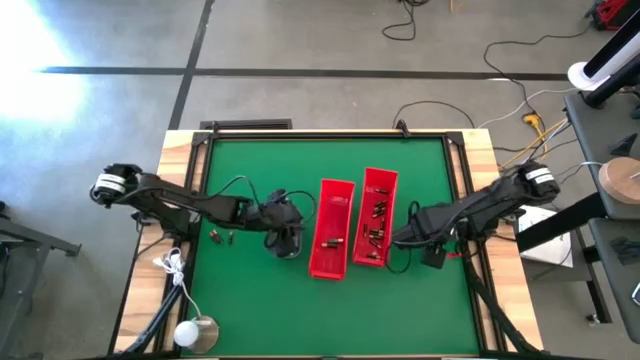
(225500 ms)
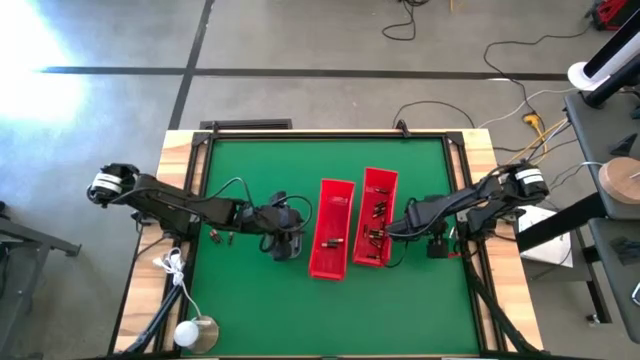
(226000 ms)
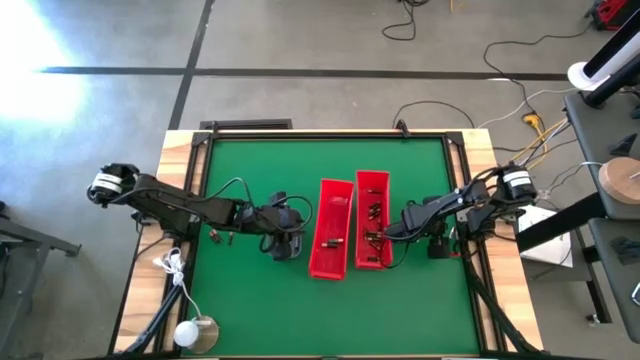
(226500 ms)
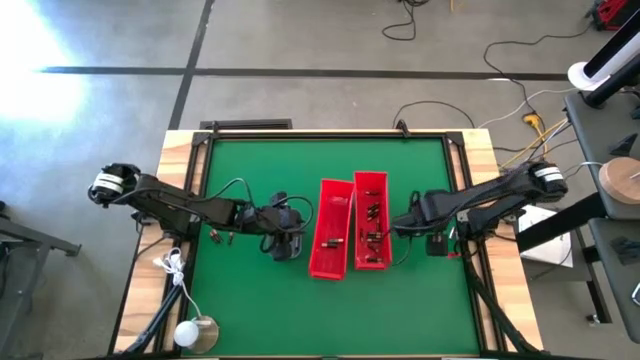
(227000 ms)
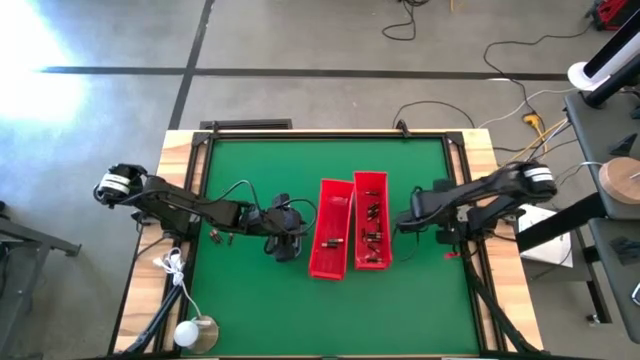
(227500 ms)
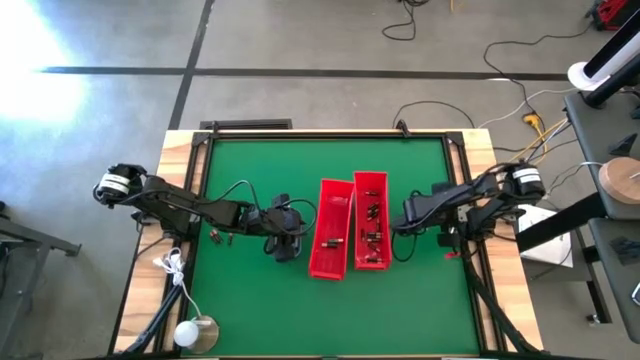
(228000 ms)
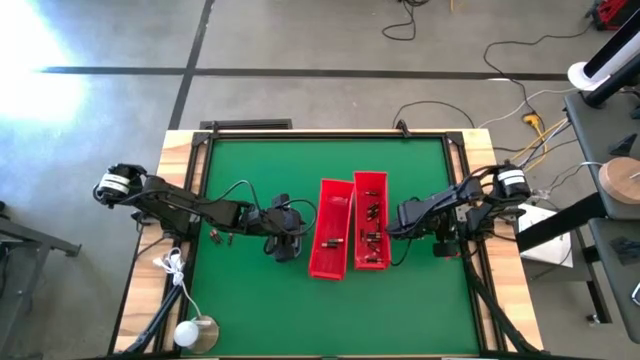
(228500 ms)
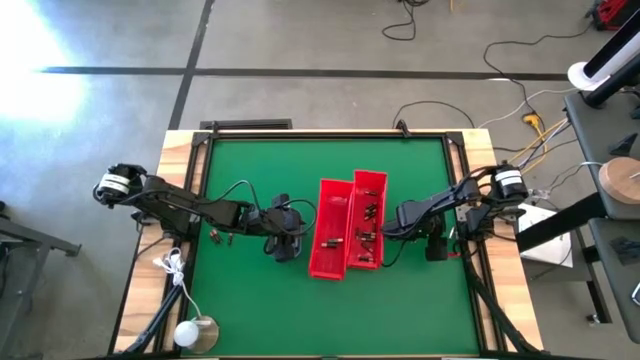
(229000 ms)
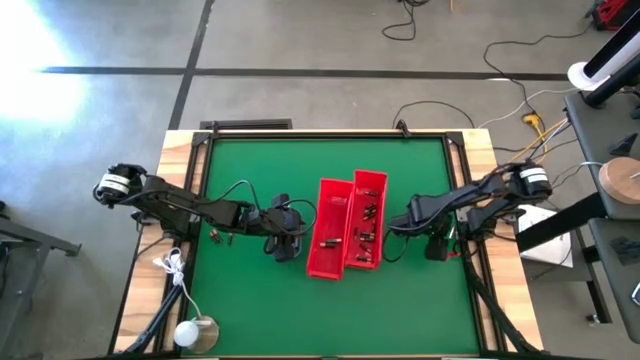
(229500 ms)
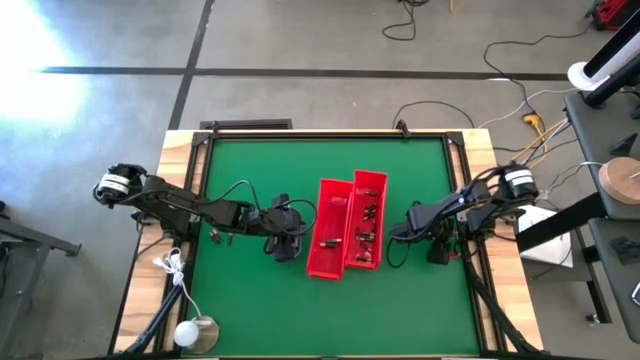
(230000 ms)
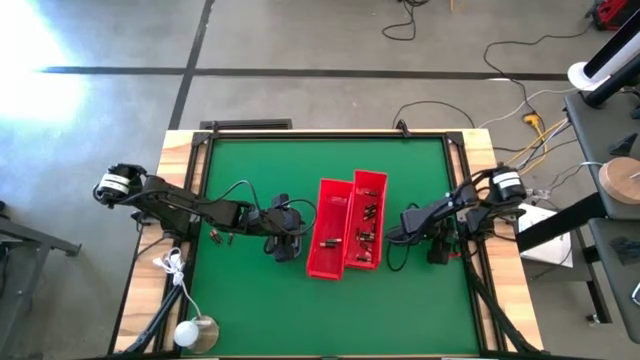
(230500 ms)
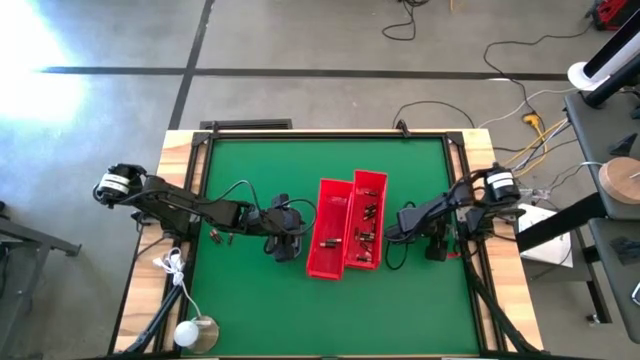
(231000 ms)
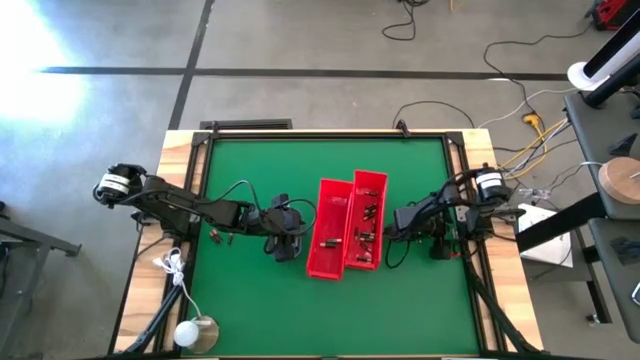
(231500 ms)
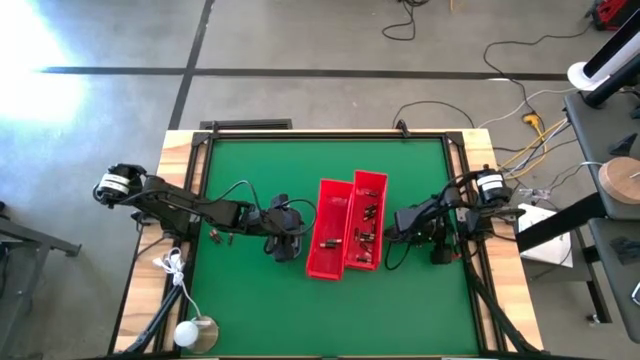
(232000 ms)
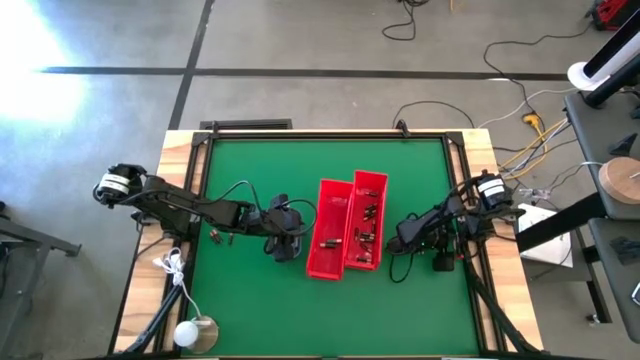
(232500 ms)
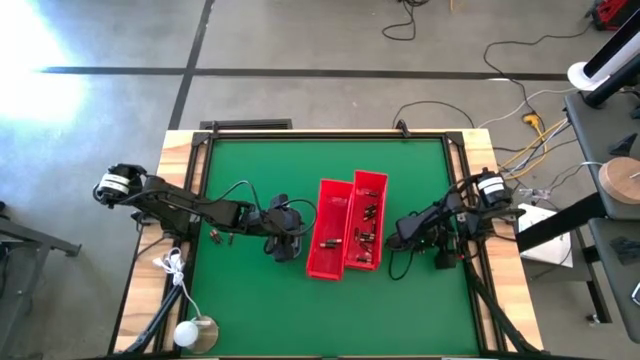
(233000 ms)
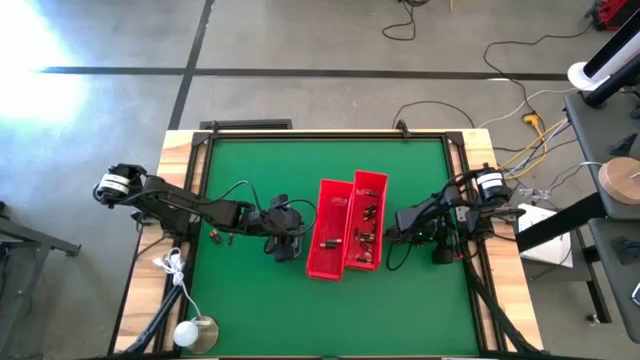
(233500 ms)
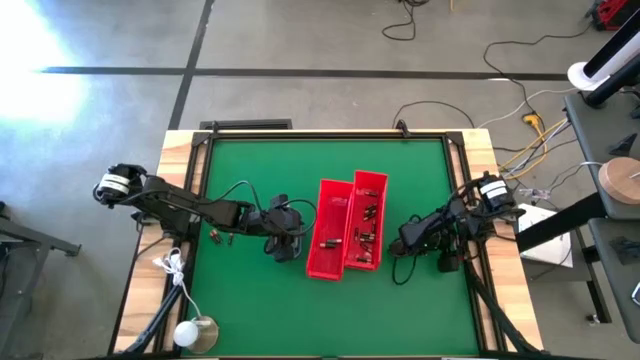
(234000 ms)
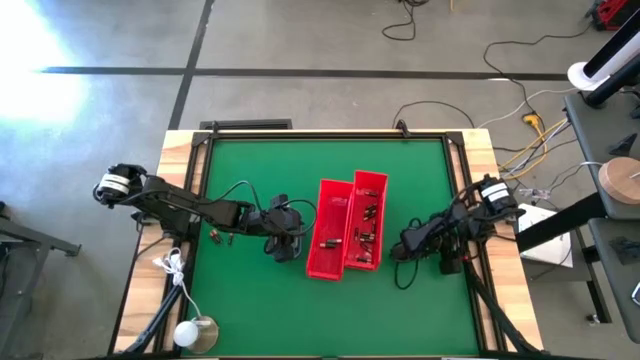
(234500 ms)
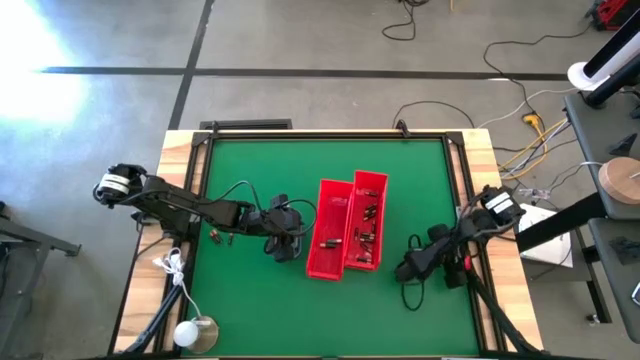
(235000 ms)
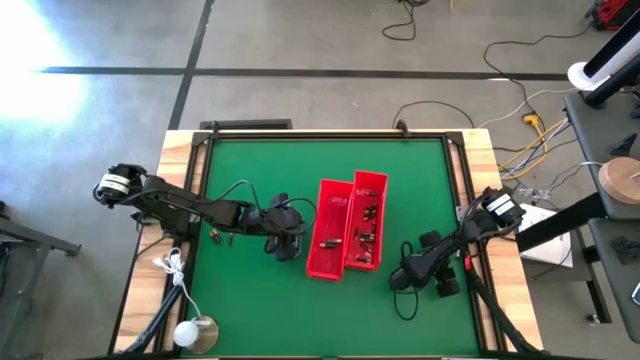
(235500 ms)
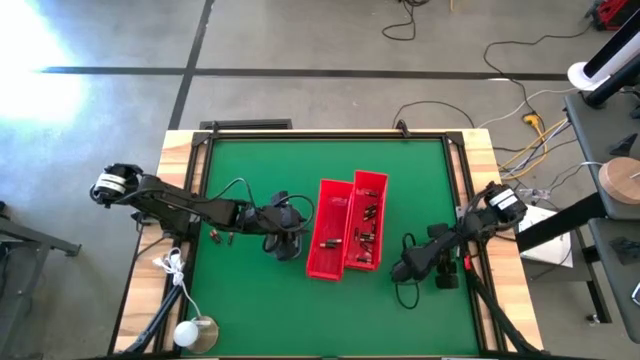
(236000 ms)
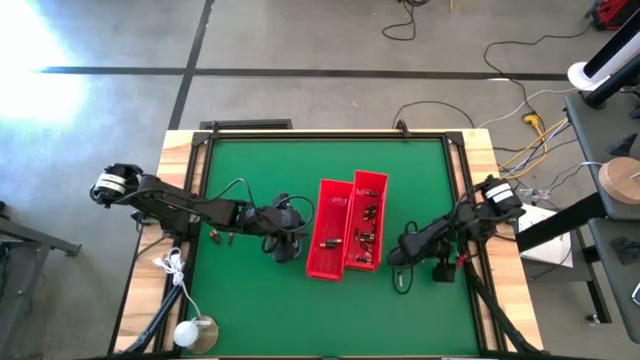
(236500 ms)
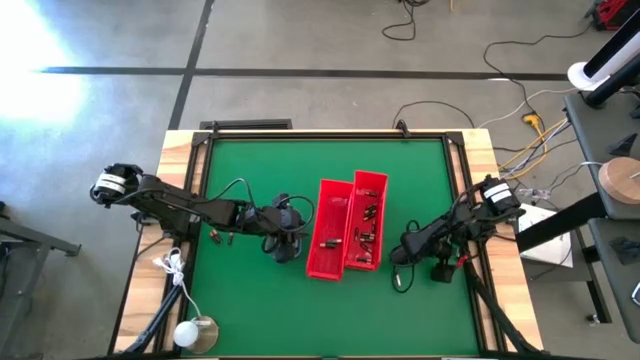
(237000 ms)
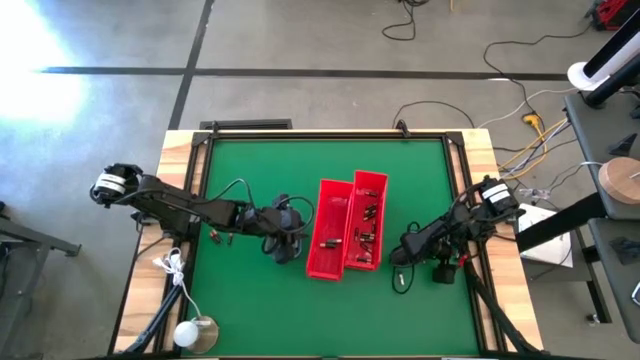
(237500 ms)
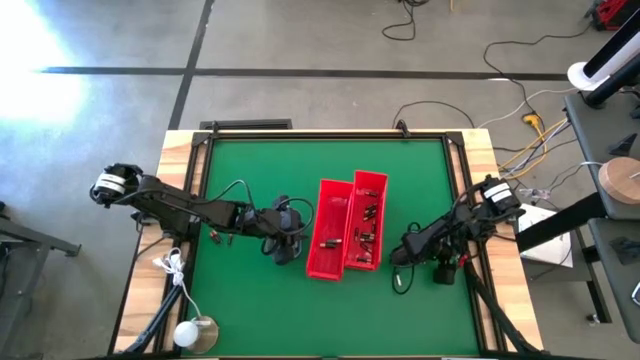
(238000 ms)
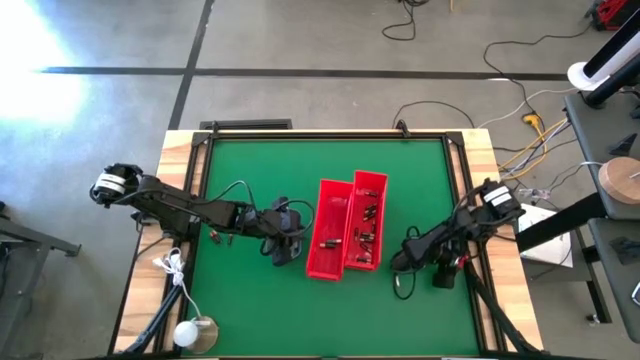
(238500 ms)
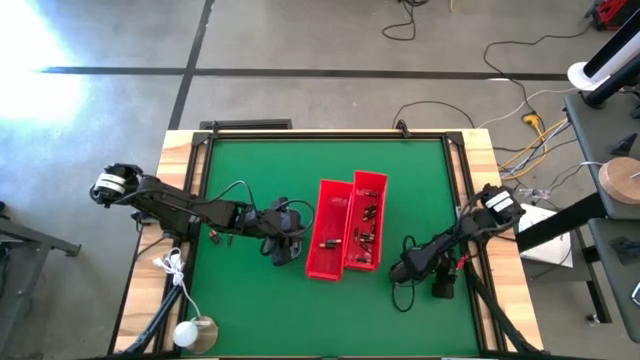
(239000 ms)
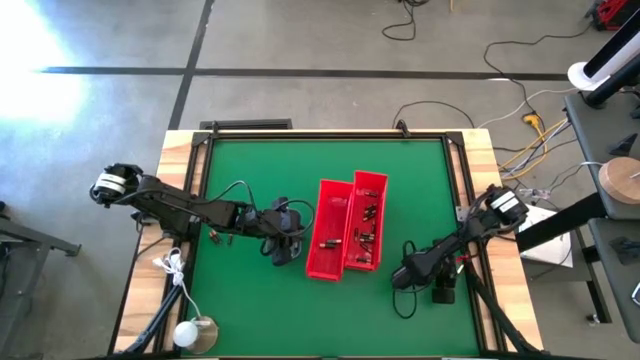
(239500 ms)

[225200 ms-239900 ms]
Task: Sort batteries
Put the silver battery into the gray bin

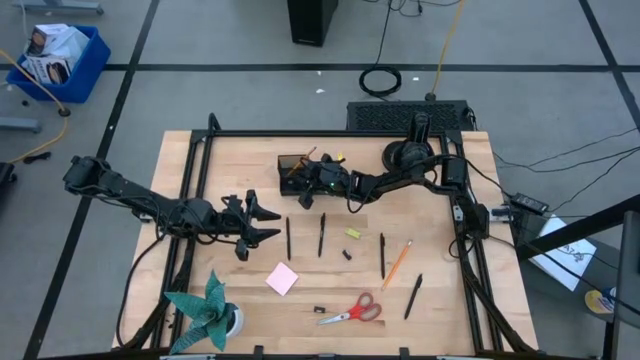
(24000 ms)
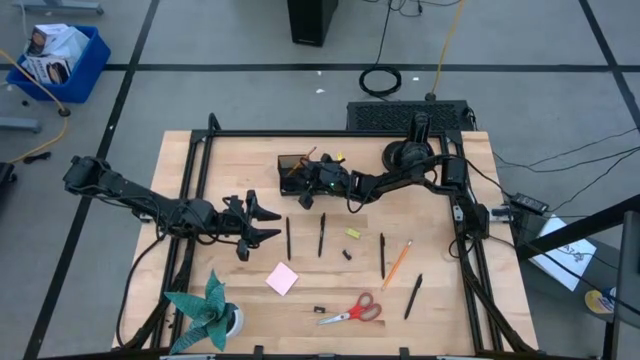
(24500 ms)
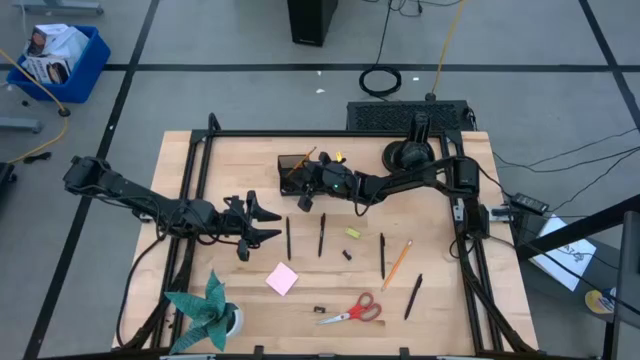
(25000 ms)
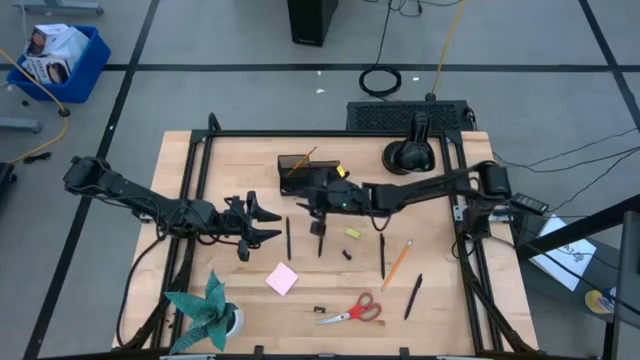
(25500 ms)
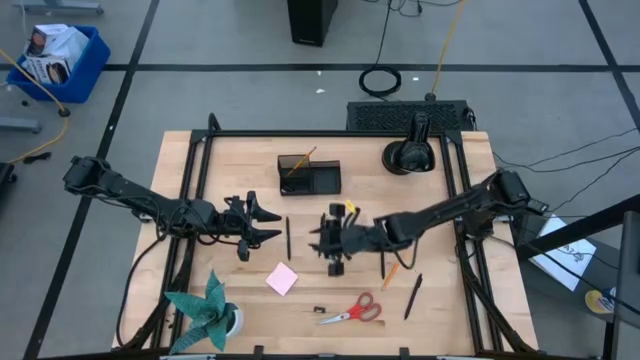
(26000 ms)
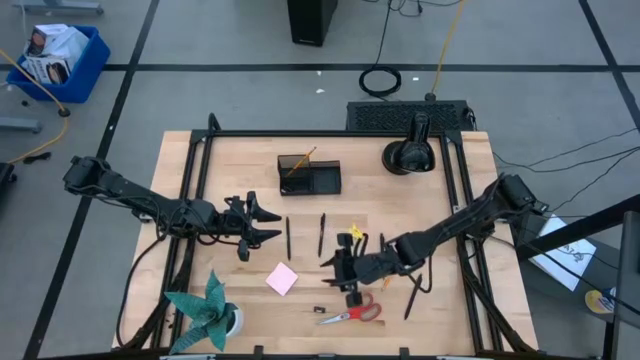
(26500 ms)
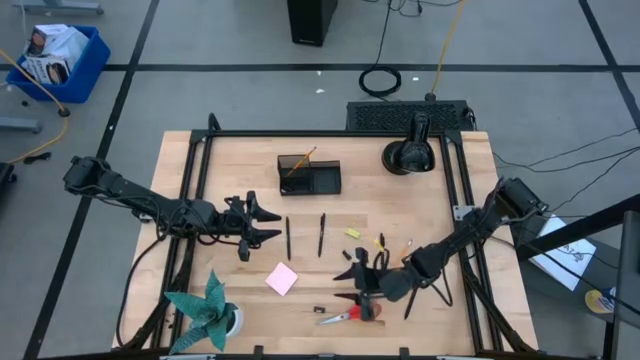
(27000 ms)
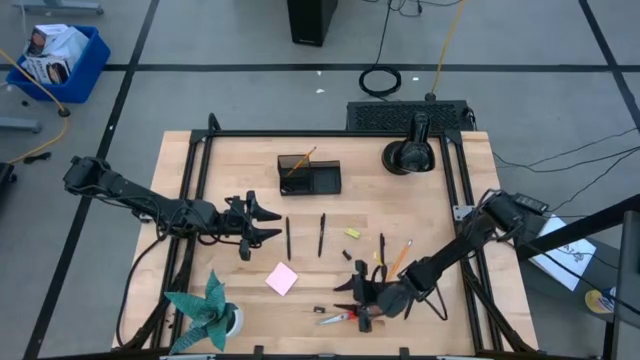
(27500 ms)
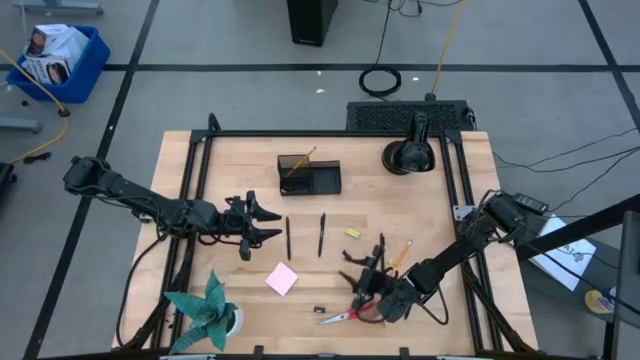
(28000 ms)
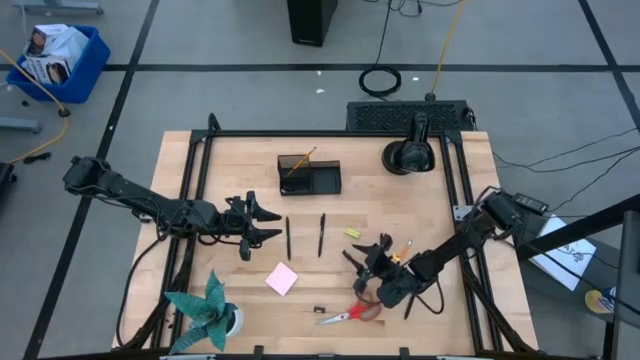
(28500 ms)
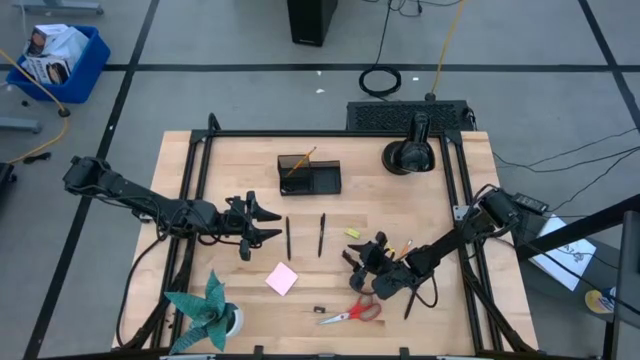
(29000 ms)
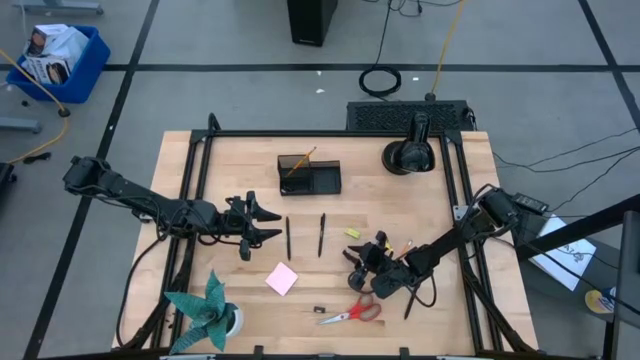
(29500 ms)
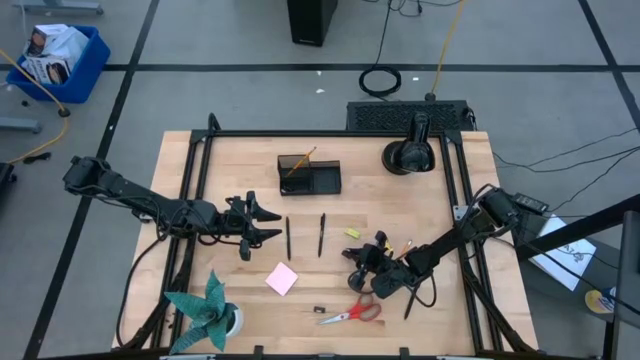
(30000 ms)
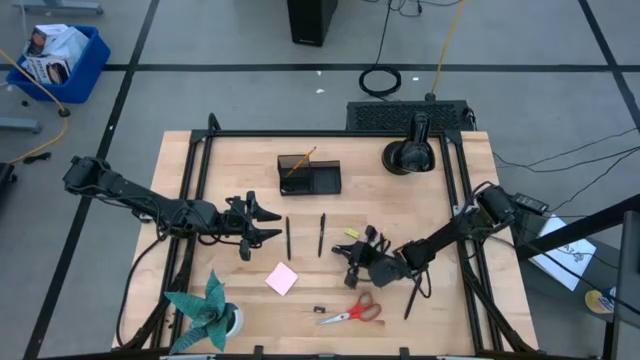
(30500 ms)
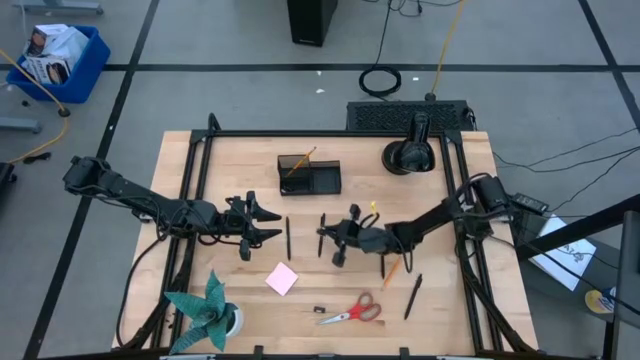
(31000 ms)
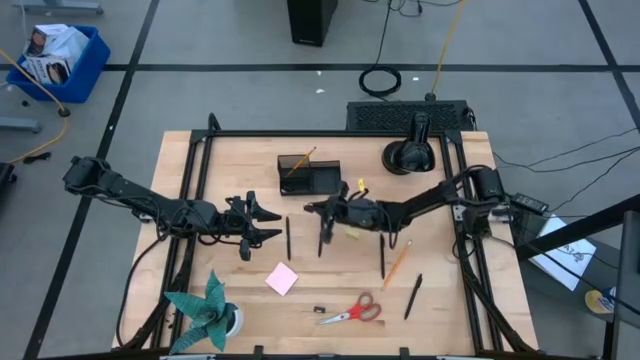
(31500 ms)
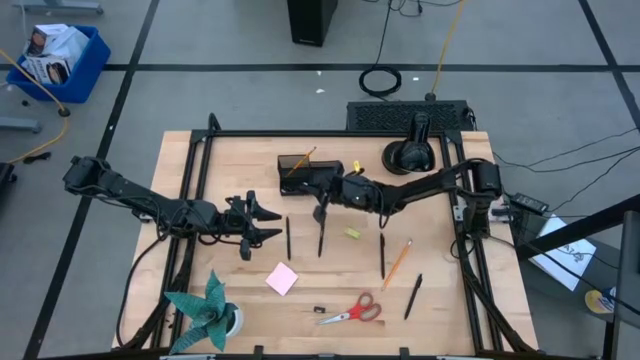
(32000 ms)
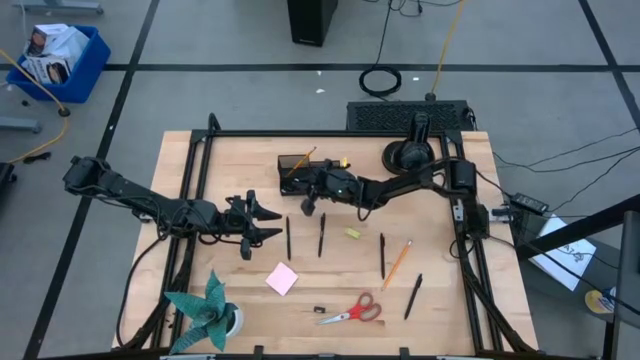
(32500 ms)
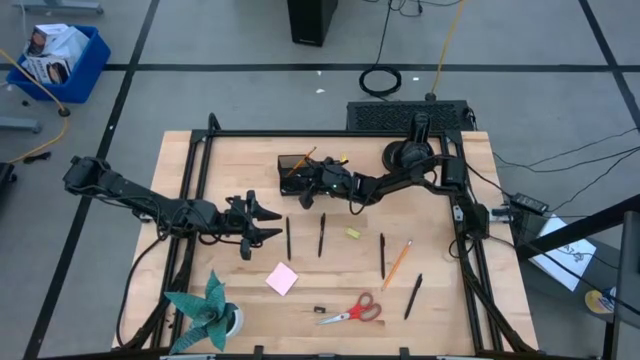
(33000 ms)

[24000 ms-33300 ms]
Task: Pick and place office supplies into organizer
Put the black binder clip into the black desk organizer
